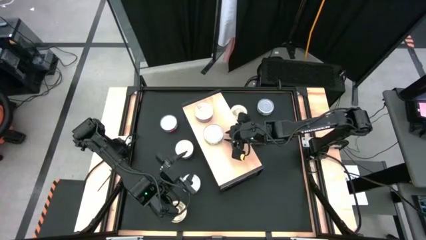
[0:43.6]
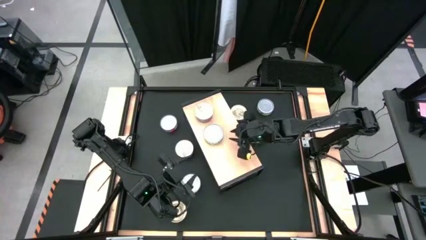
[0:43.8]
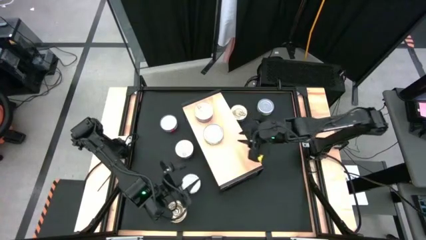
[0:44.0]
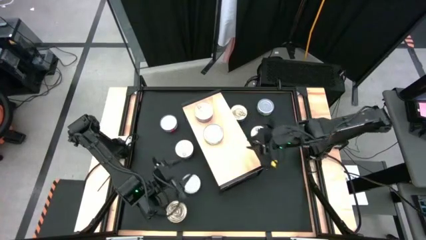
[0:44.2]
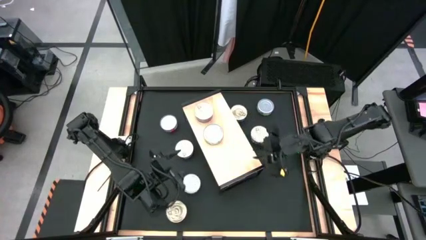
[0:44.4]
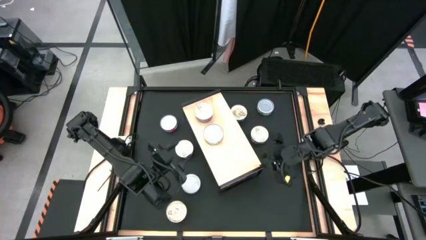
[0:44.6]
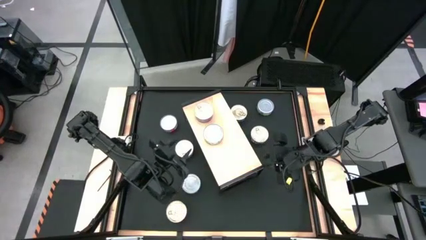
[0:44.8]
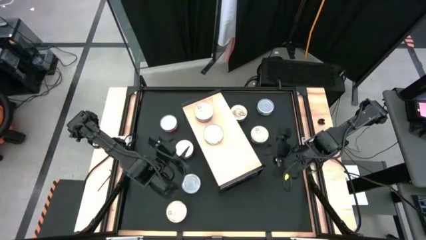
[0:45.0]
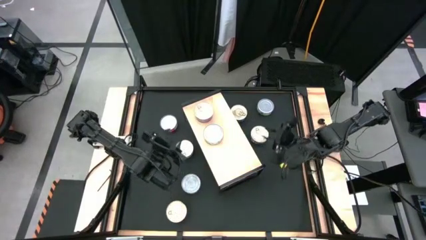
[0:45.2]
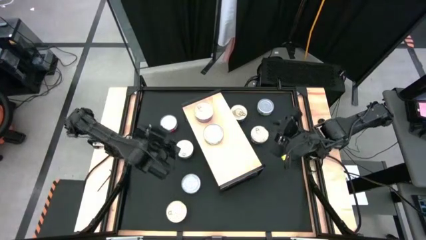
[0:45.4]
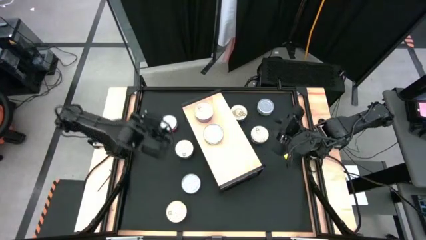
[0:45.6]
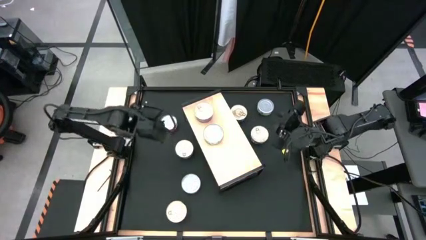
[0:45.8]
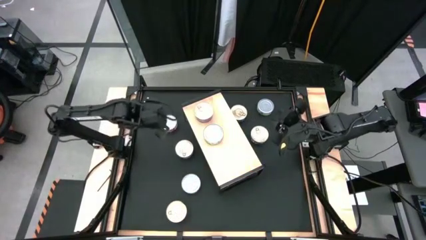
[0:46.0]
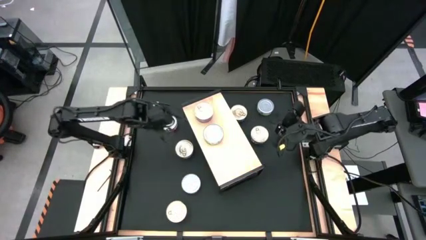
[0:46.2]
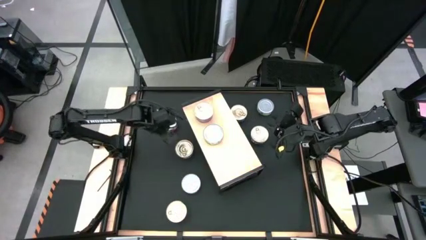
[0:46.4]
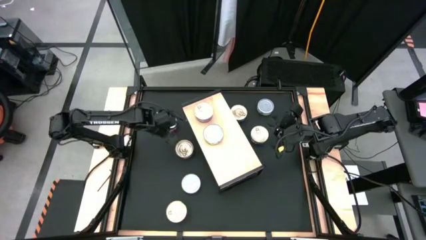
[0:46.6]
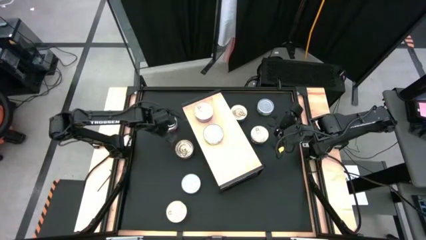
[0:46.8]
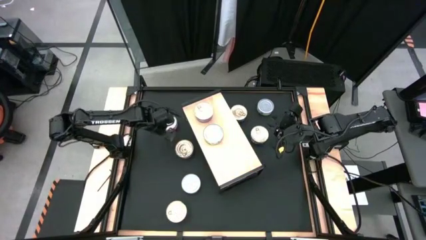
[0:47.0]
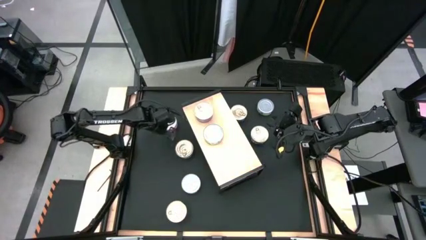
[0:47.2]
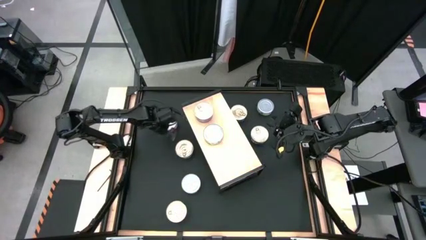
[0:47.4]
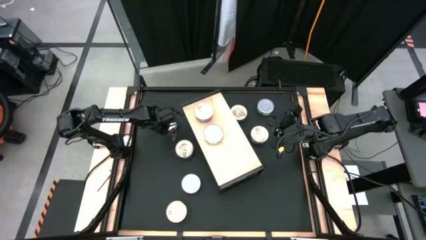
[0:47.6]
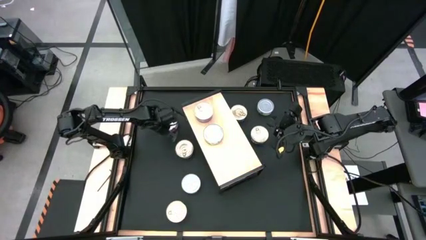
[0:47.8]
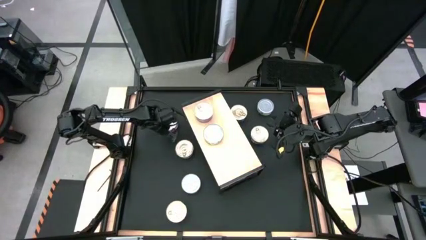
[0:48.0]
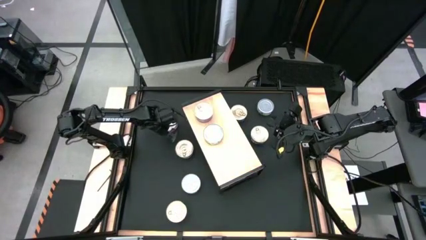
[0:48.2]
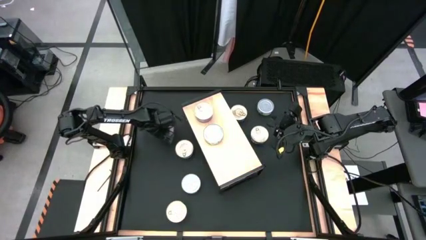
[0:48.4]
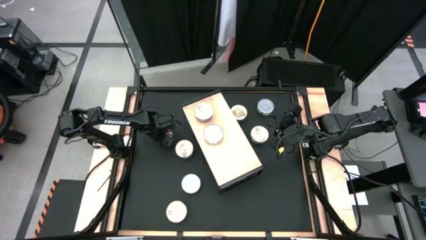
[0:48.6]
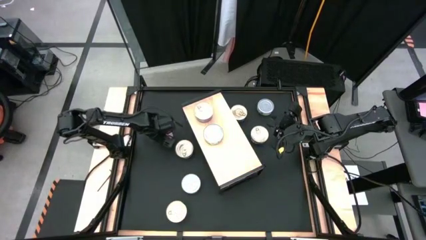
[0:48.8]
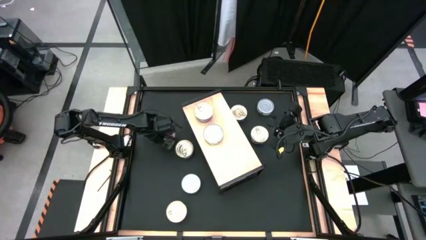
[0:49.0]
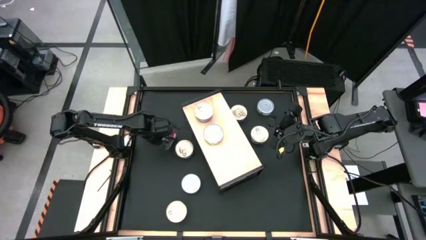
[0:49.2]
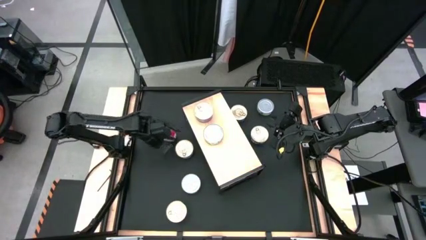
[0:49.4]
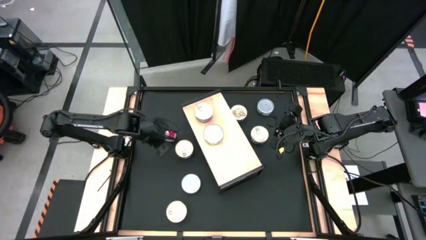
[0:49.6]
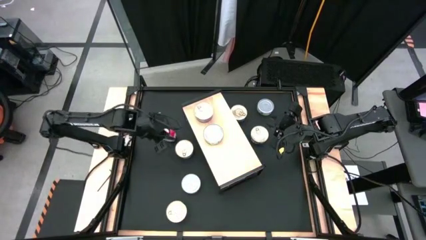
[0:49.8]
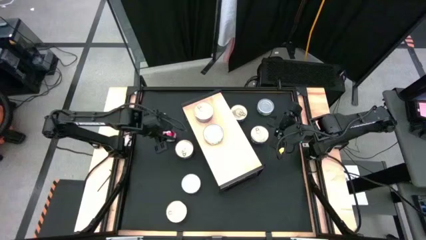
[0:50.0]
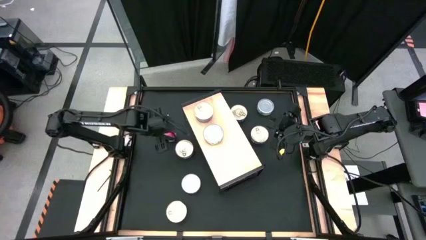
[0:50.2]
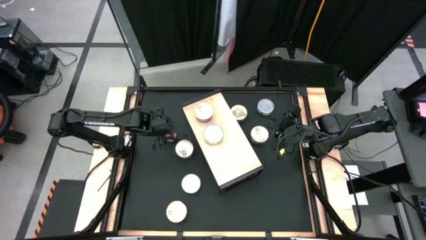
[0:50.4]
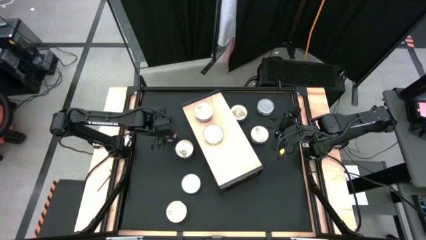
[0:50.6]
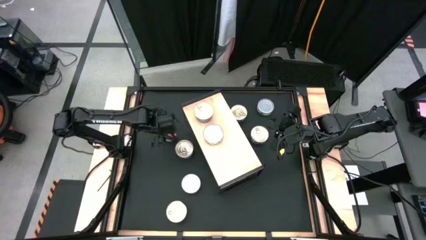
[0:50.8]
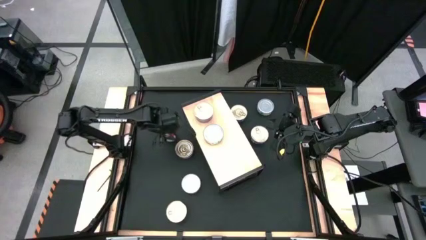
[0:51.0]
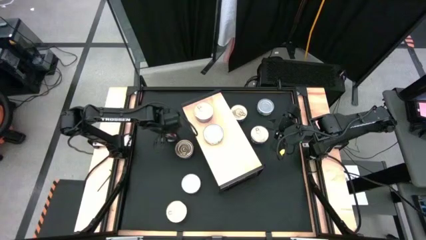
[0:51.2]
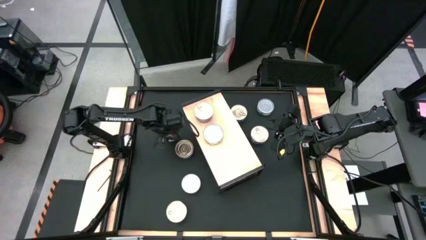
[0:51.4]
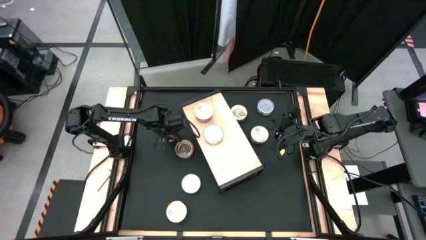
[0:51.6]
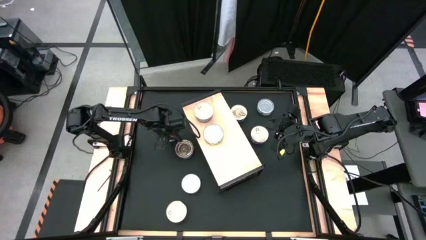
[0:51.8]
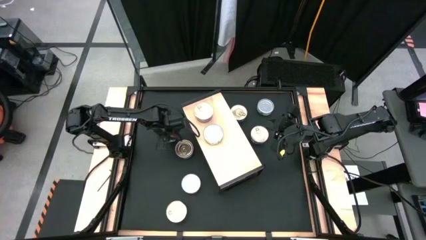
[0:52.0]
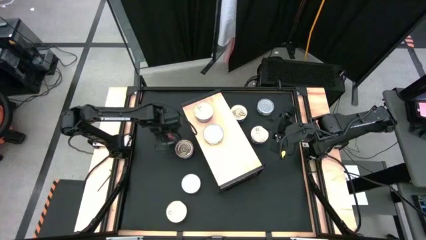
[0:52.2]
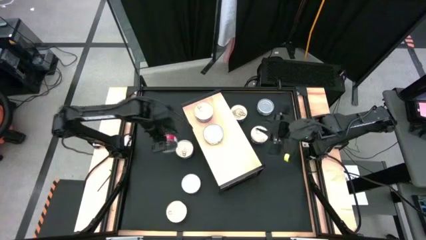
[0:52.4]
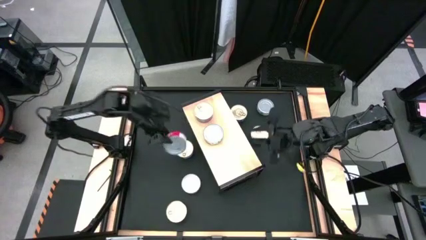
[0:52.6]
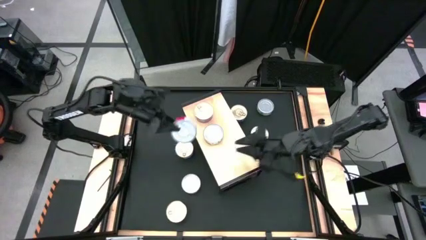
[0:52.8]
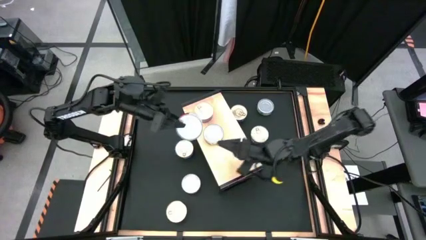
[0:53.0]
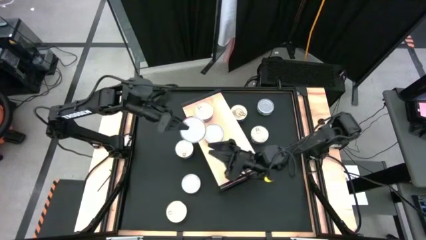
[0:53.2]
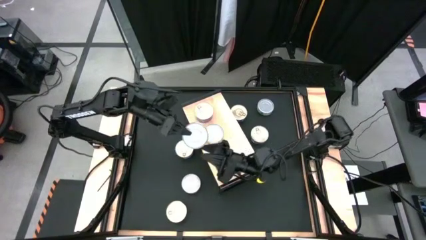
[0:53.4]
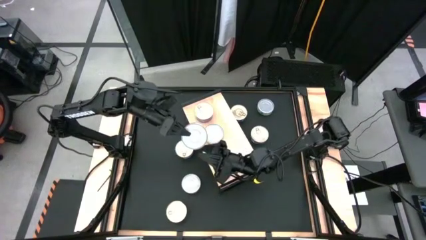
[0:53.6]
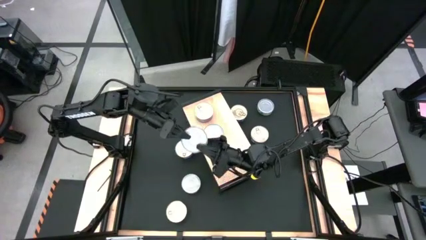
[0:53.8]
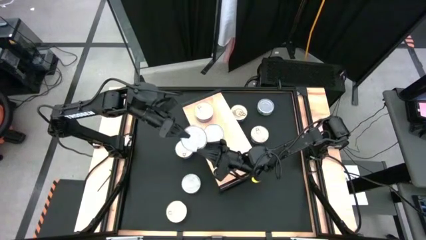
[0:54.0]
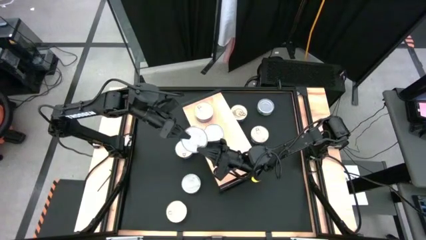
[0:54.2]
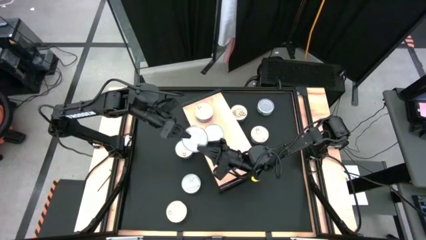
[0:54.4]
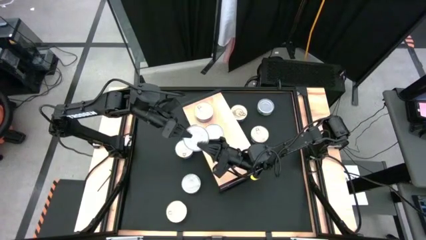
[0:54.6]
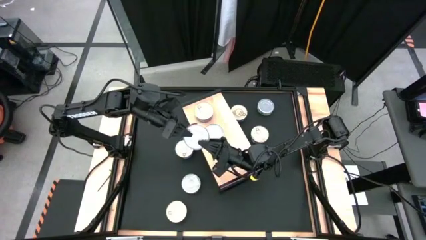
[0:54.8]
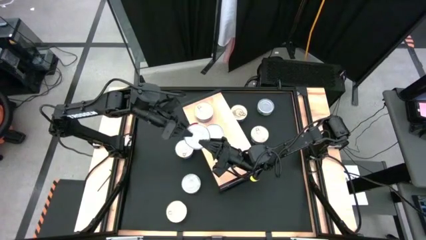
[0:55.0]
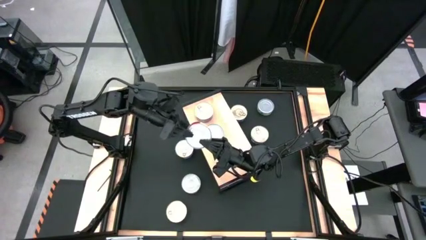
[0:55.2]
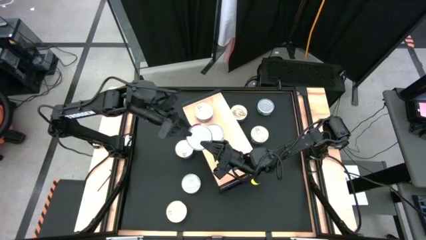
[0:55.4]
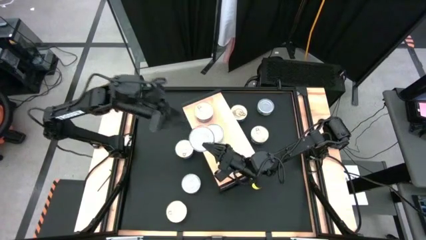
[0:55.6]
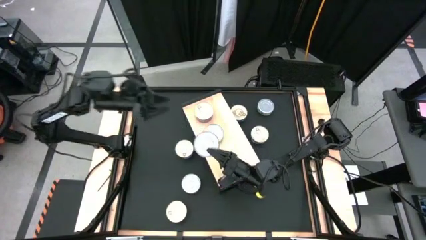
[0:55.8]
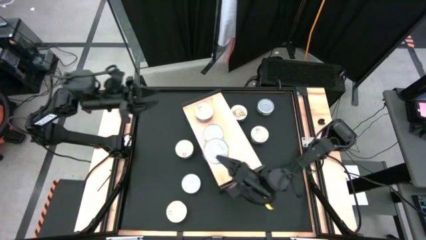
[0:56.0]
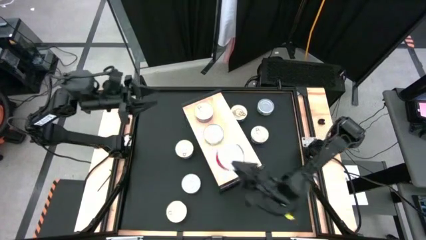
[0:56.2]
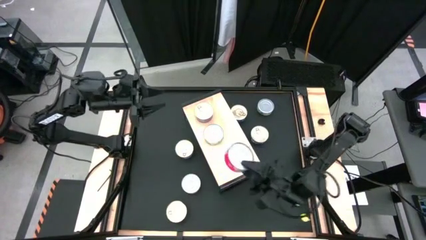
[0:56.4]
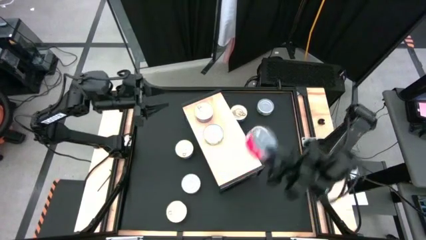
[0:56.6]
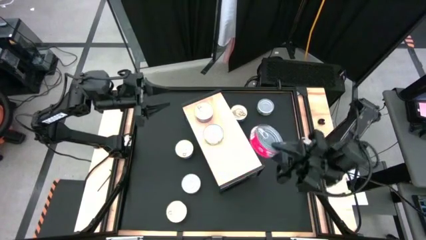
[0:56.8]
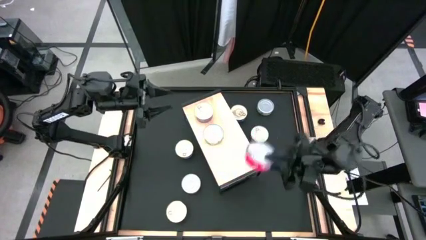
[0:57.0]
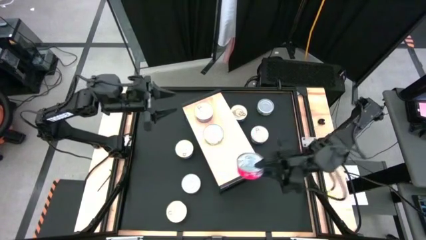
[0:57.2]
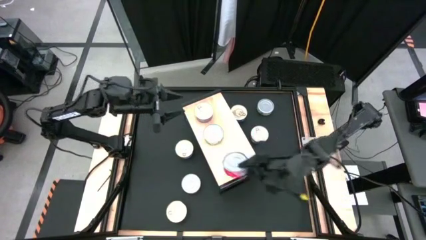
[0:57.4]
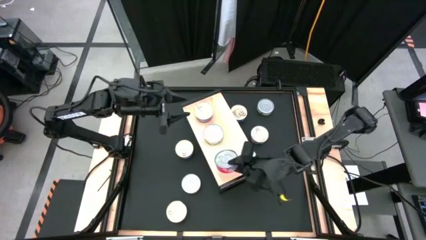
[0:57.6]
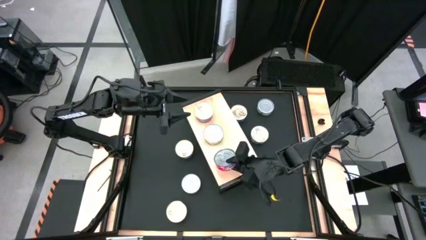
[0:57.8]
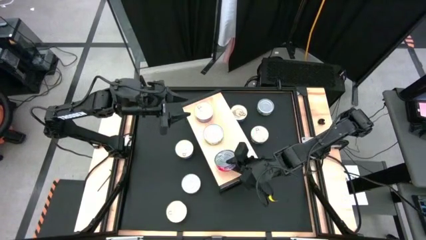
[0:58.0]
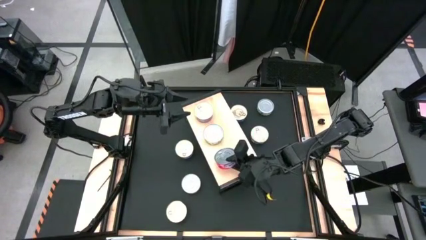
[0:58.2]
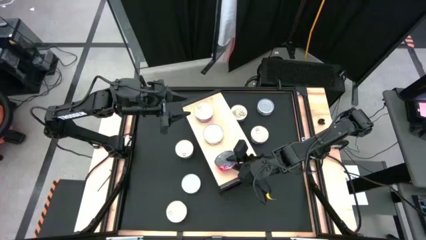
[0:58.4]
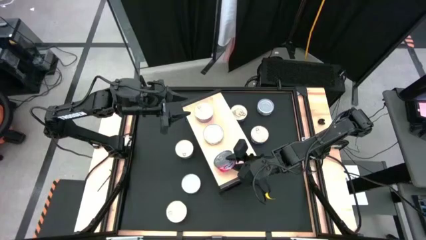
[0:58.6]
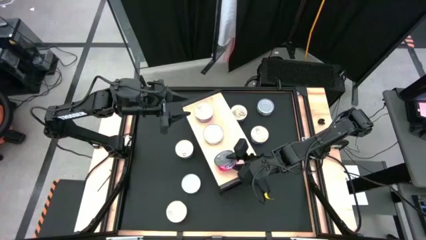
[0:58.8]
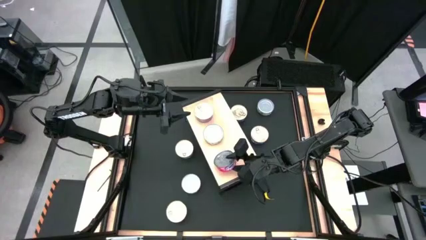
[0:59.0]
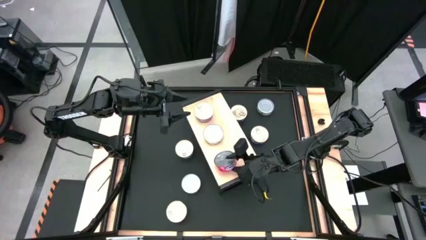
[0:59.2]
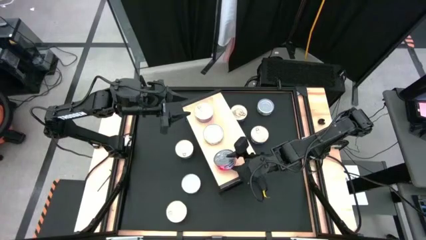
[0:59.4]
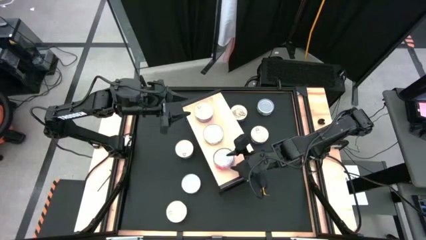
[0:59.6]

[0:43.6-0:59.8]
Task: Stack canned seafood by type on shelf
Put the red tuna can on the shelf

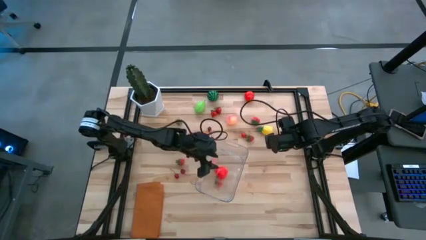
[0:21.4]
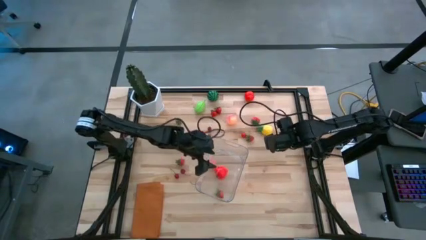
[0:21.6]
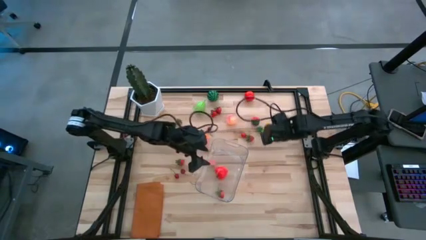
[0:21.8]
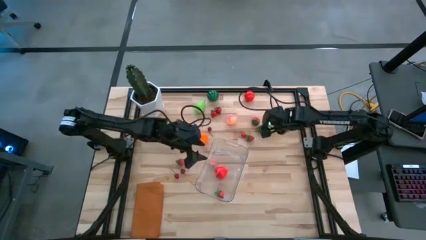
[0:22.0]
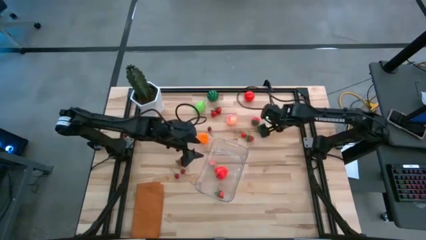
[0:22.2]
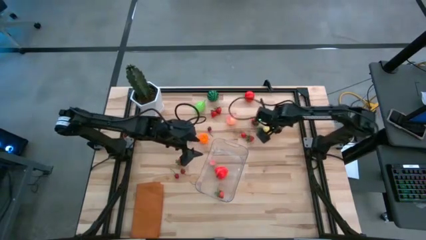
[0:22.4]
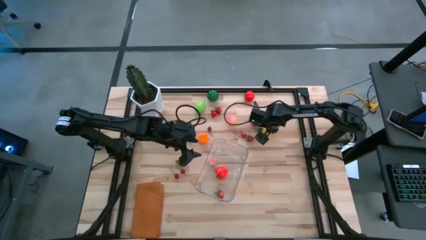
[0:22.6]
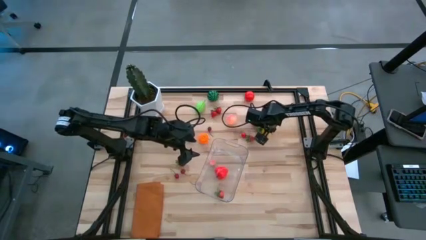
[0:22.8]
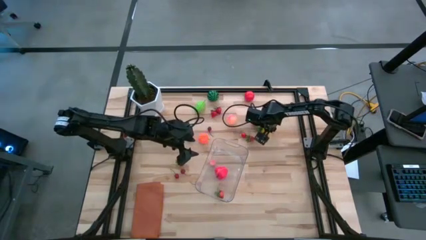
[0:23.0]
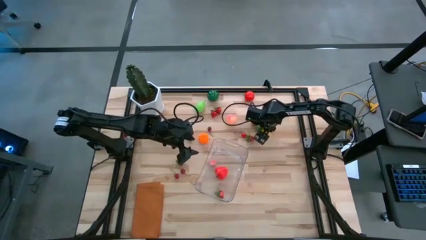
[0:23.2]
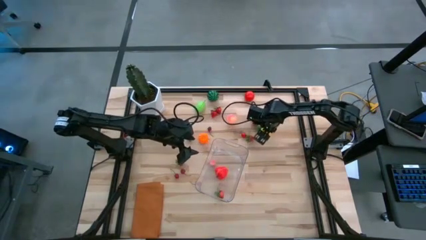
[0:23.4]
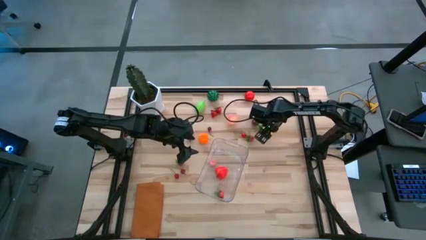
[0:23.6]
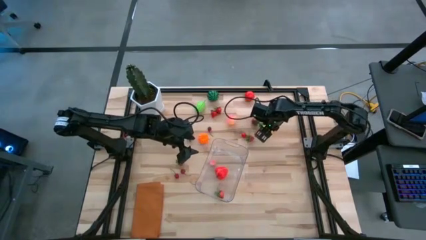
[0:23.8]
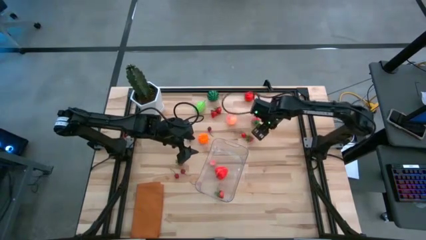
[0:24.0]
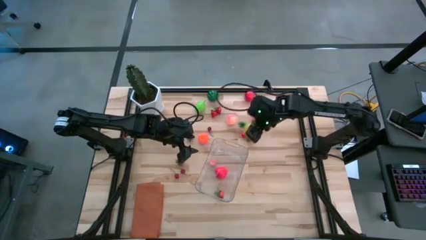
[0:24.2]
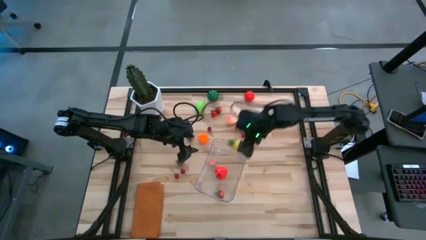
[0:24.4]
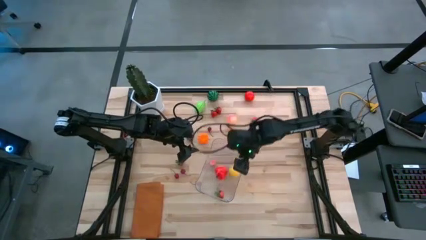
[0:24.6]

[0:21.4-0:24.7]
Task: Pick and placing Produce into tupperware
Put the yellow pineapple into the transparent bin
